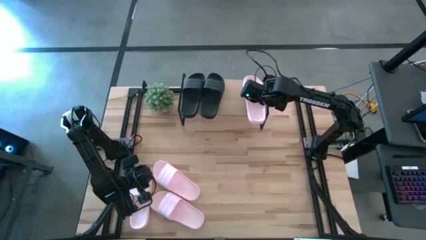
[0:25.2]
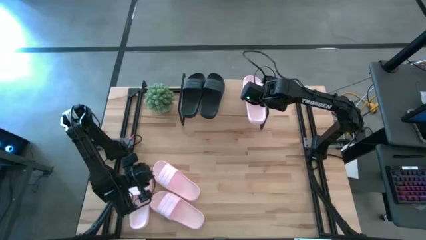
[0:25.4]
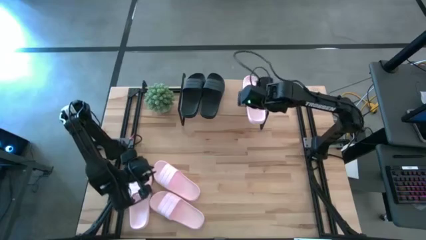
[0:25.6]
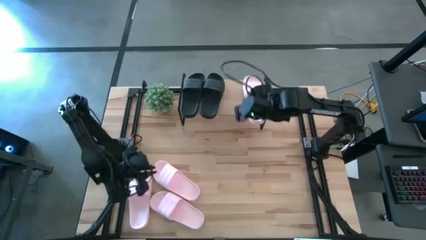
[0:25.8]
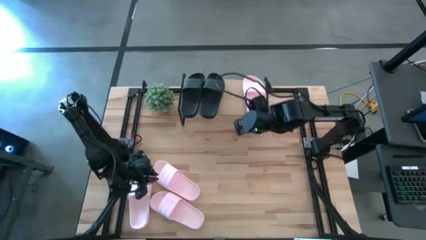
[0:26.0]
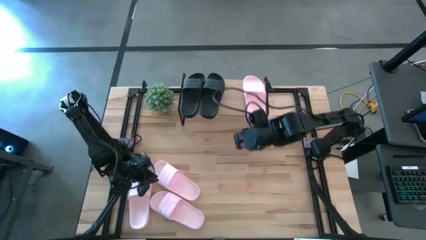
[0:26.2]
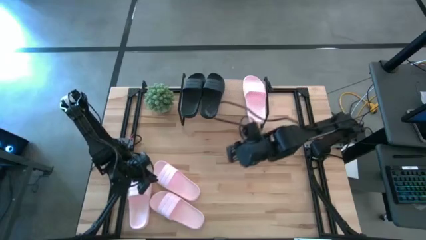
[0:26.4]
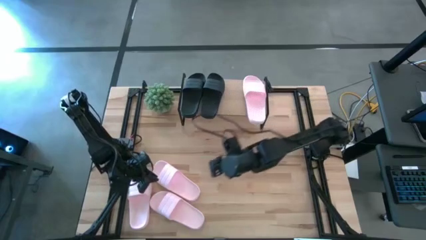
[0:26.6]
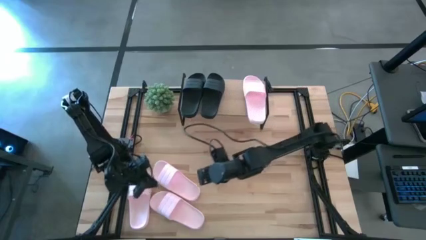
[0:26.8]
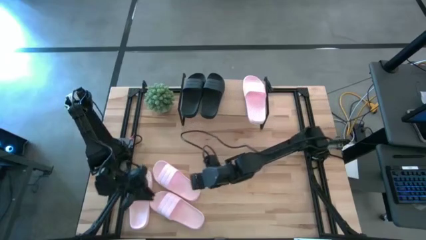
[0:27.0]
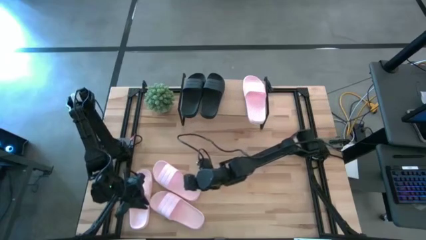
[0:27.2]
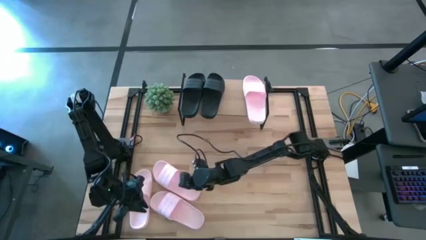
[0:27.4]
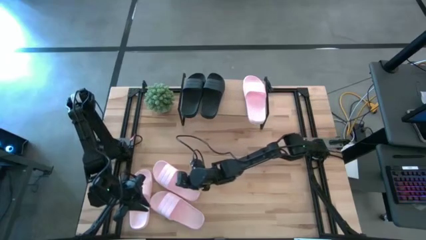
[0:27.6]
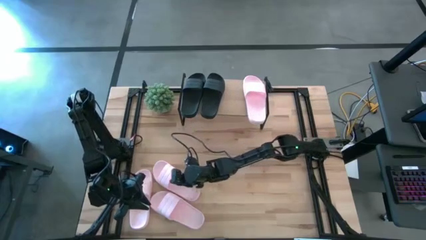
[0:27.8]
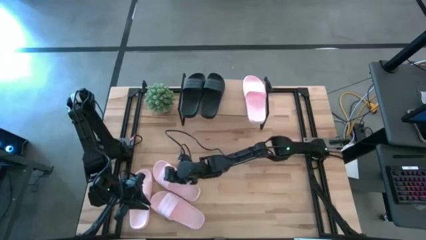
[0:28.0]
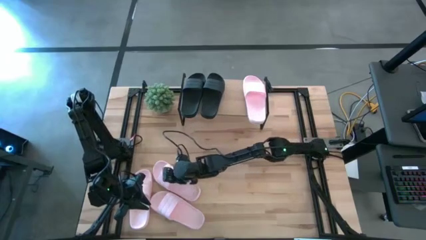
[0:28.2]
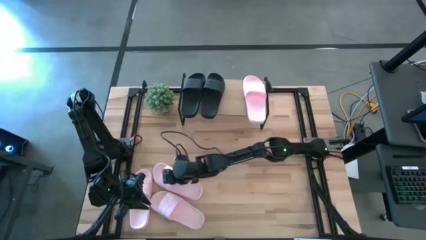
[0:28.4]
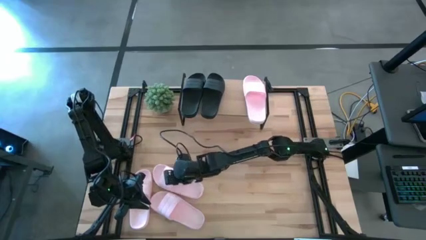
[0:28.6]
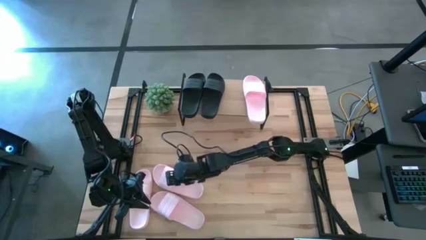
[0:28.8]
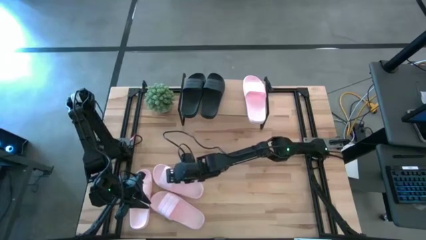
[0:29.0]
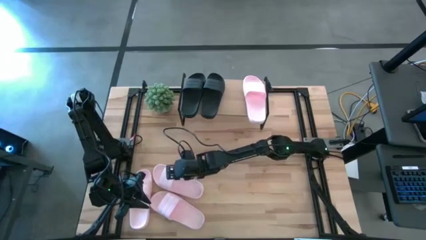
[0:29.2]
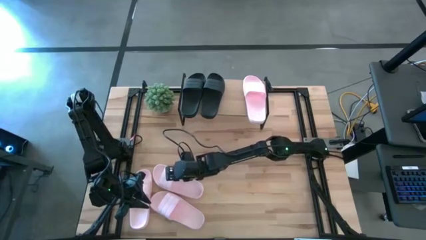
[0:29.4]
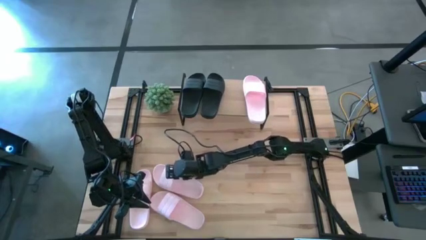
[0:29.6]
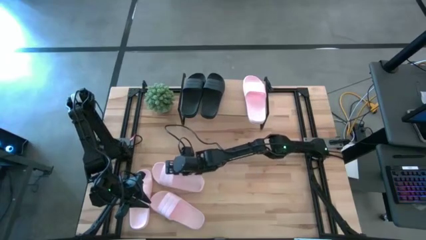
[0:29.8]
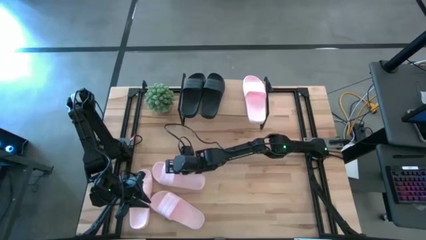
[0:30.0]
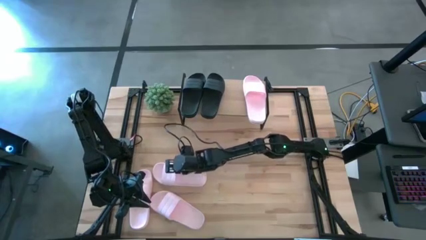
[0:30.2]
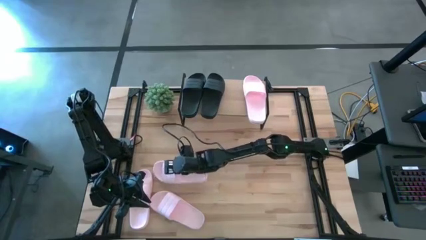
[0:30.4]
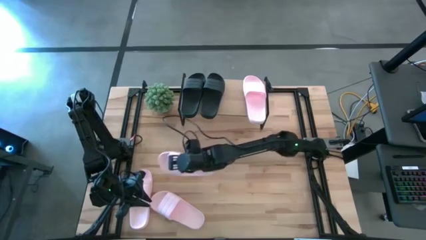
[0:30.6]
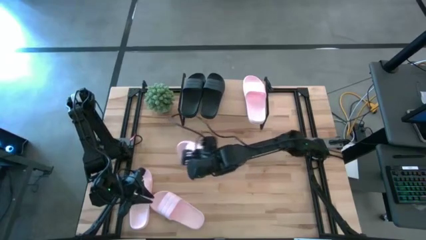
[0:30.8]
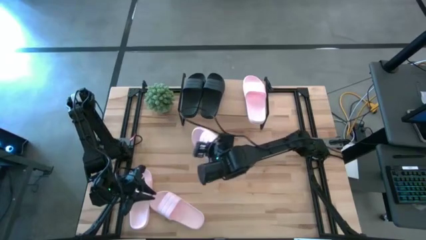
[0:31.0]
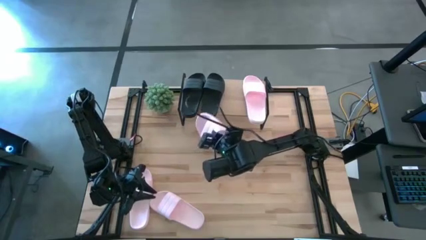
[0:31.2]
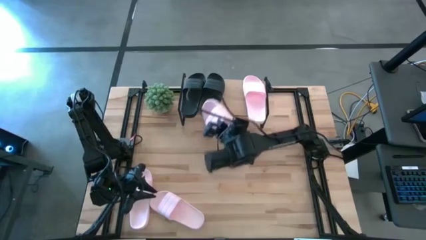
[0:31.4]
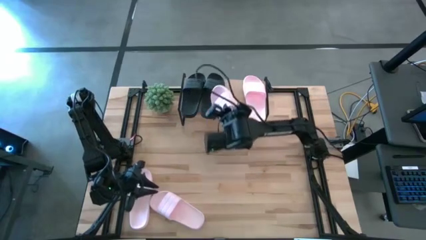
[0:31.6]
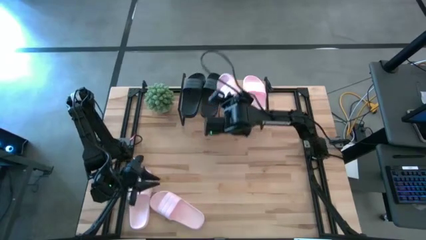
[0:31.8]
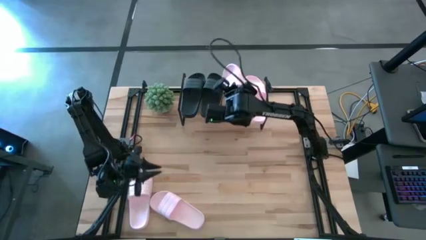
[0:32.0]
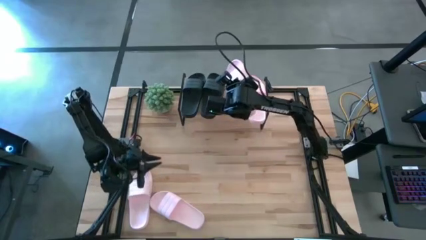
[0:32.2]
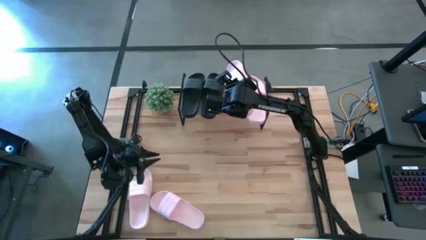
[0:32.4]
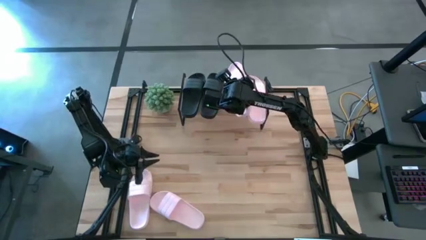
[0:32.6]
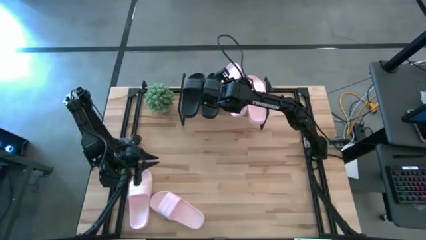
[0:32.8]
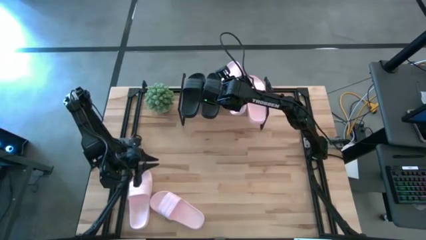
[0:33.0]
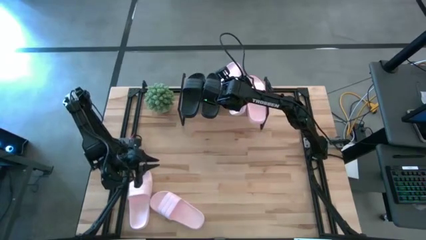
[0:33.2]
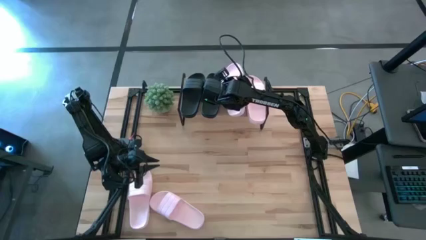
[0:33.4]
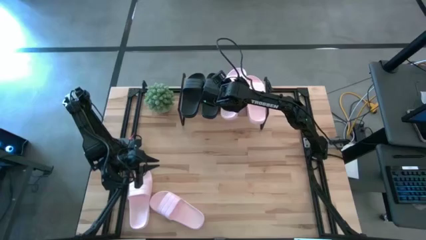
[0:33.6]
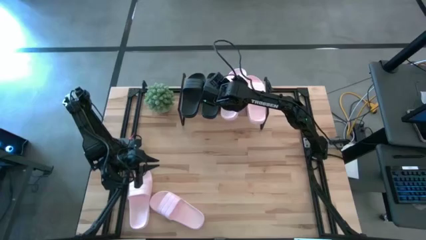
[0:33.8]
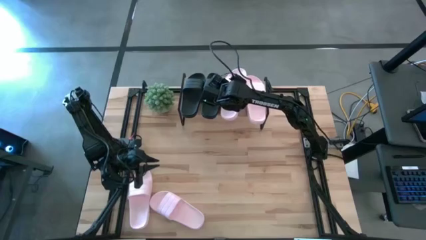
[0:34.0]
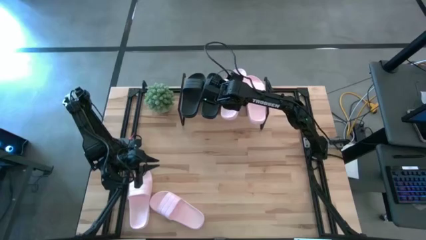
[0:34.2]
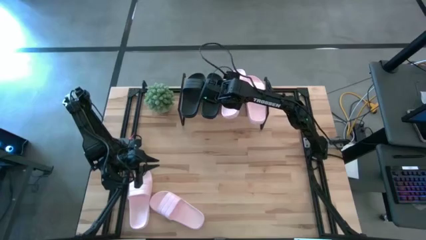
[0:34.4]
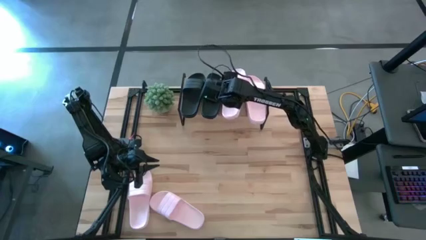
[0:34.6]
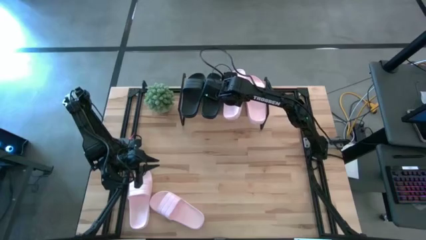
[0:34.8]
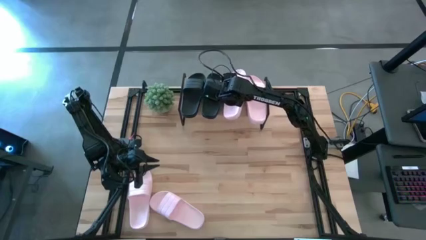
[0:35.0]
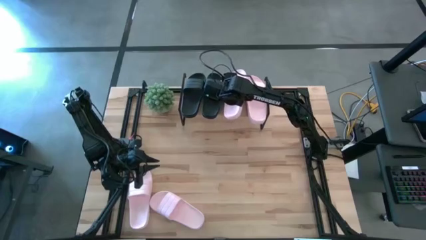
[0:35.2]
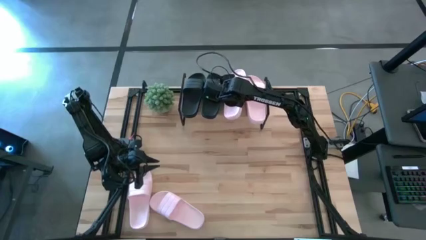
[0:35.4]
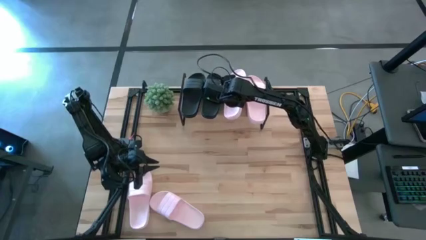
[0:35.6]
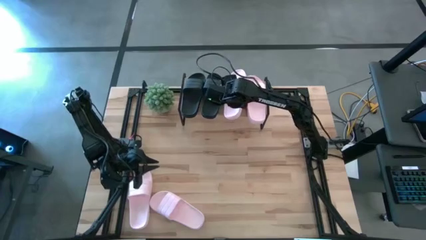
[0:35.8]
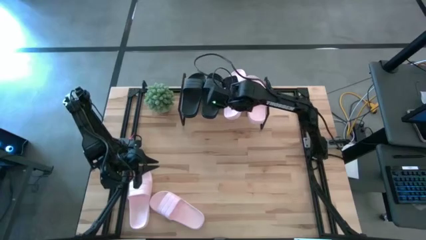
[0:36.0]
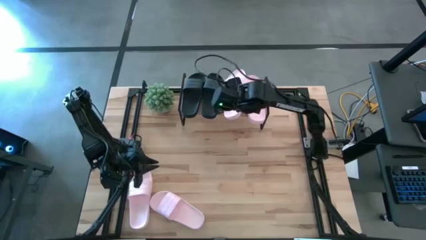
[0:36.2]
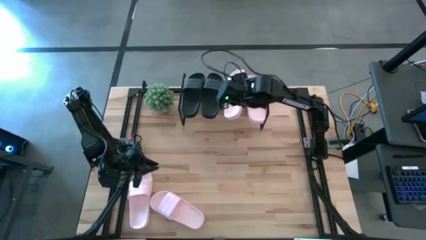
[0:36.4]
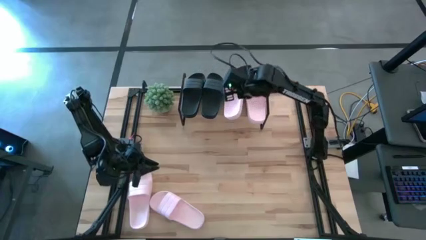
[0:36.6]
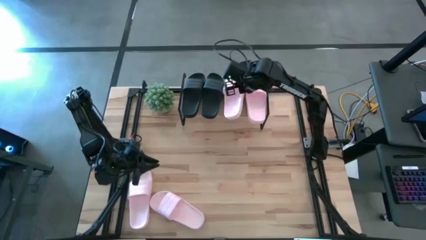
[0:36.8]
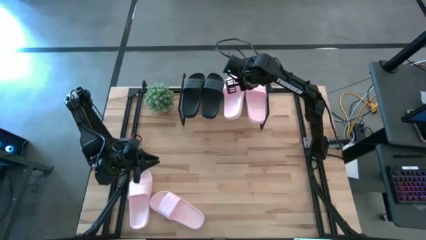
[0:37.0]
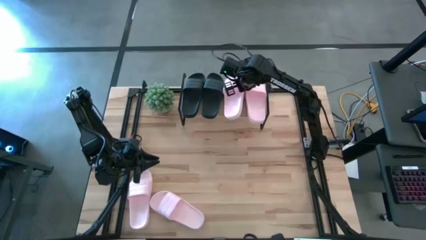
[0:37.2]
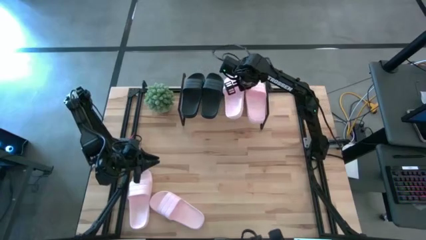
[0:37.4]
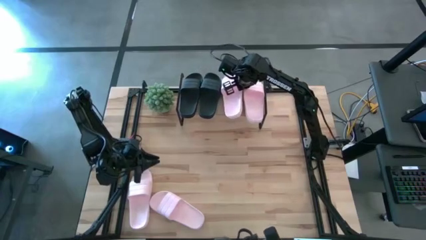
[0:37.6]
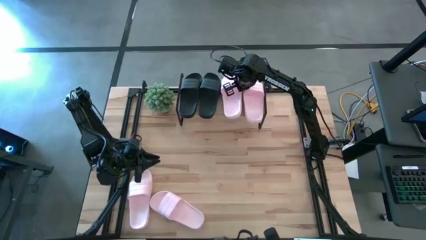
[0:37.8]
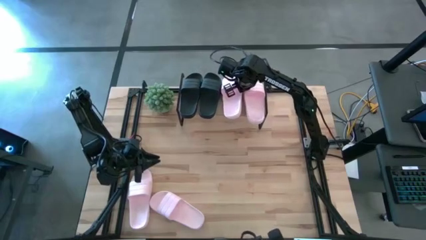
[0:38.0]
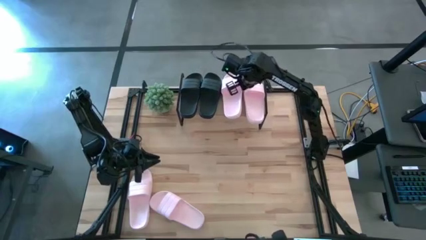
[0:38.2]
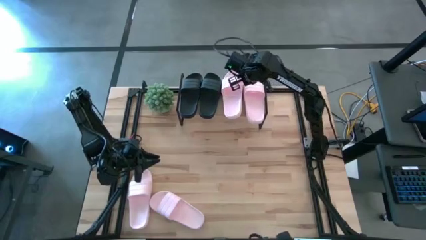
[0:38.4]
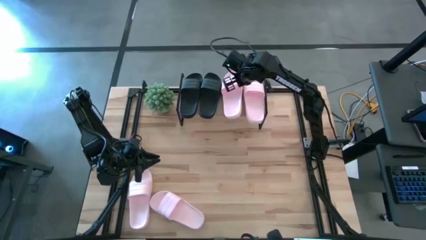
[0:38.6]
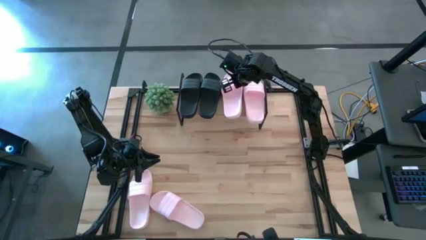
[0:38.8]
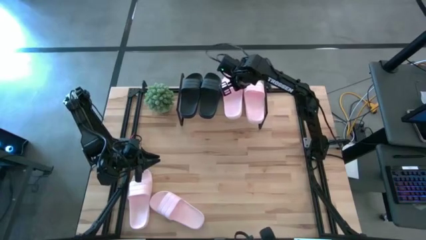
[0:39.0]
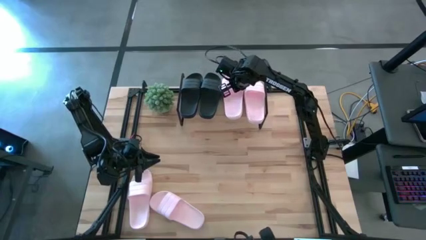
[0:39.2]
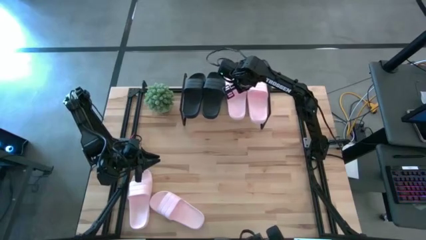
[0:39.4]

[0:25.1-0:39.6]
Task: Pick and place slides into the shelf
Put the pink slipper on the shelf

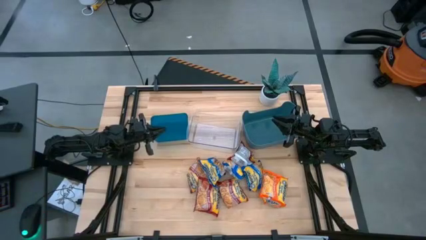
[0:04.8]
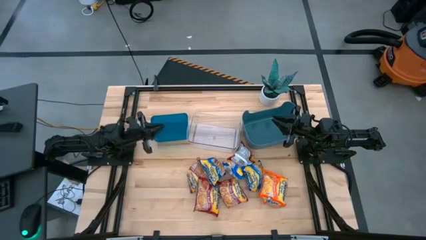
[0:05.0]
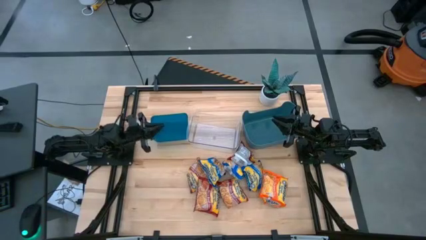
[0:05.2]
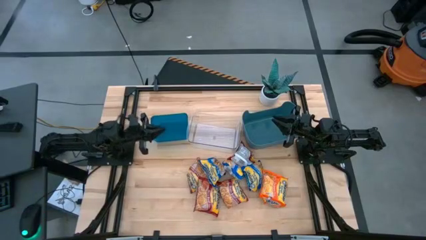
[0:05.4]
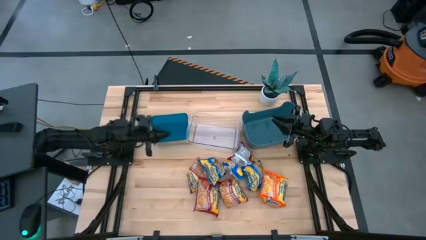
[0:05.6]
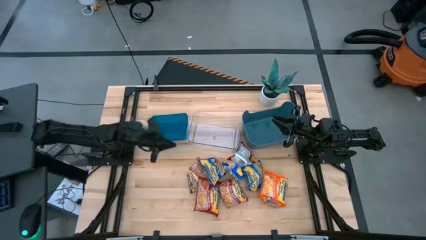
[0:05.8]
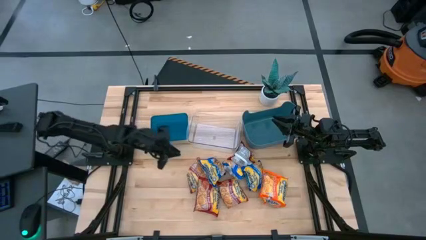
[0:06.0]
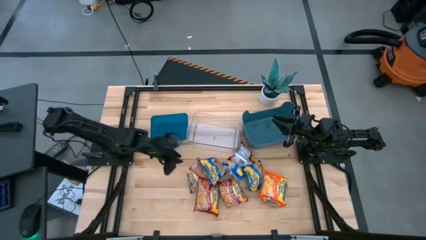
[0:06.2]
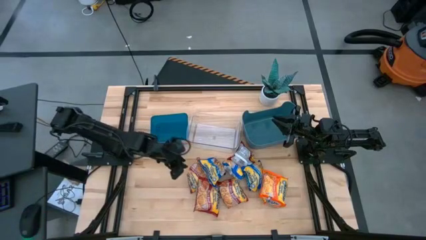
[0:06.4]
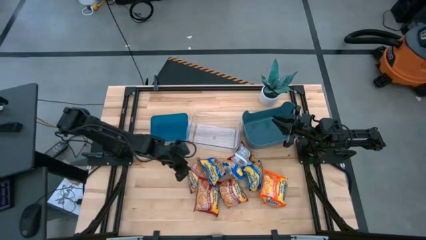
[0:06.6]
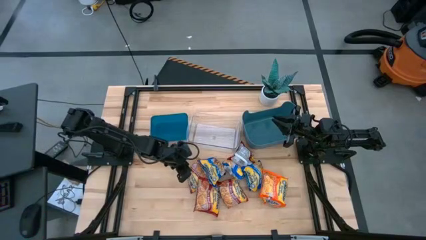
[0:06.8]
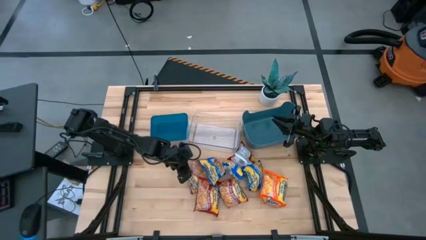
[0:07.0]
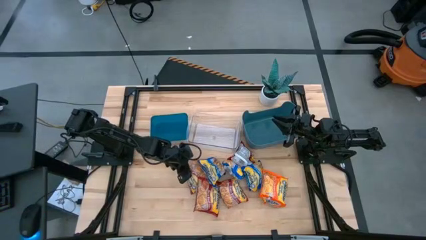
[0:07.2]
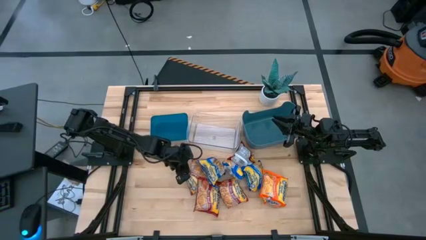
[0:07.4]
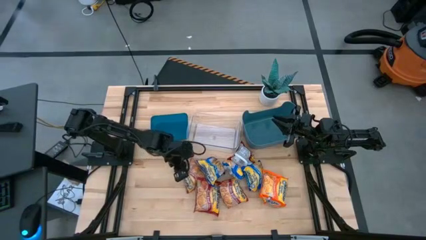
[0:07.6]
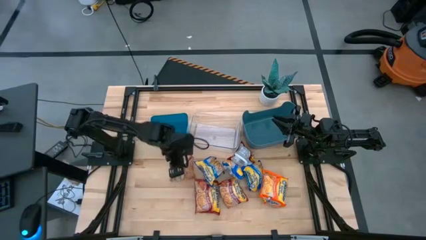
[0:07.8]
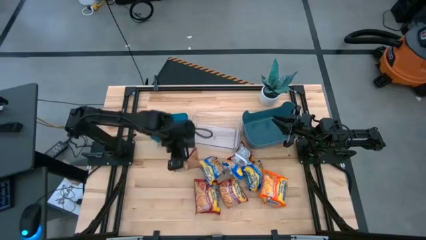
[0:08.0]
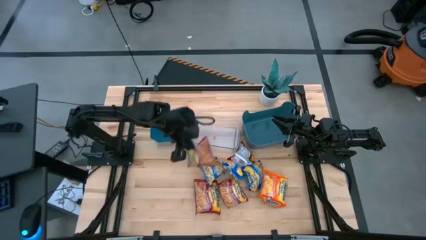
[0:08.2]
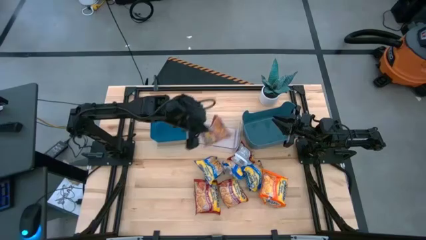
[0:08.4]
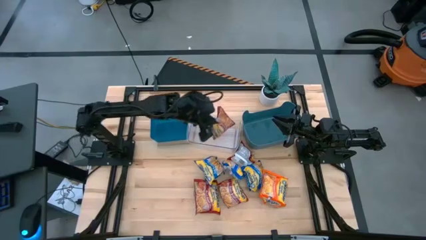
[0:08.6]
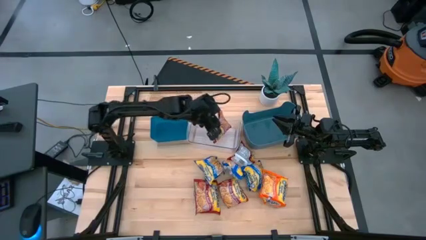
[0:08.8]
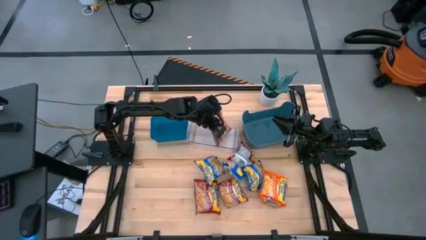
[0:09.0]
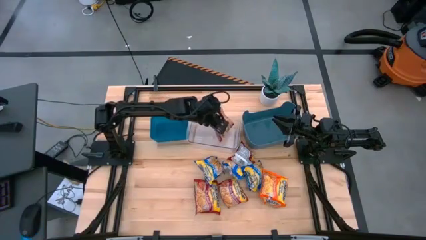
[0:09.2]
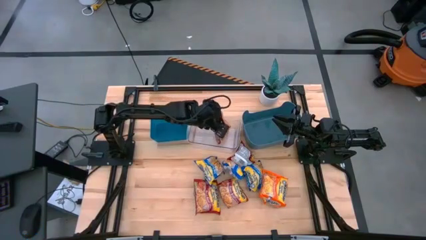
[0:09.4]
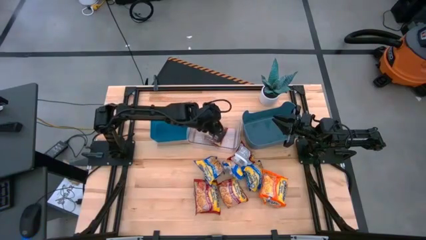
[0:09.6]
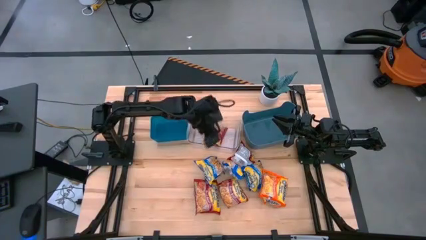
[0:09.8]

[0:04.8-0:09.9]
Task: Sort Maruchan noodles
Put the red noodle pack into the transparent bin
